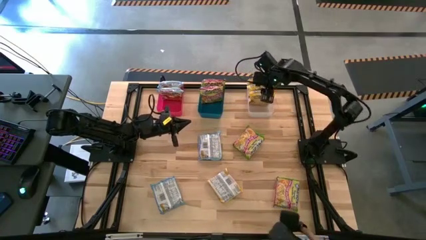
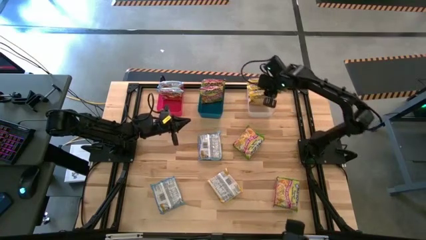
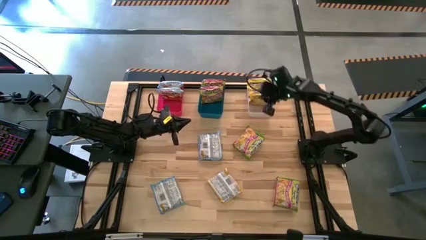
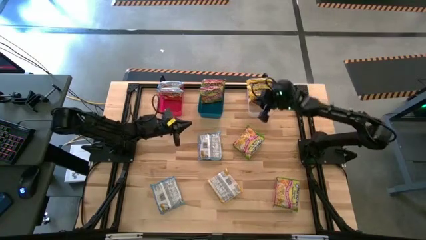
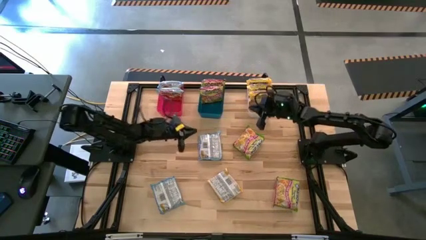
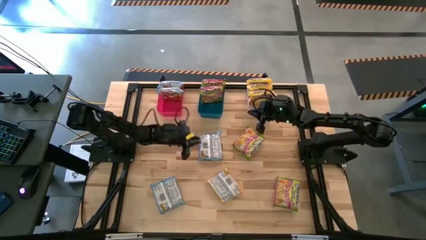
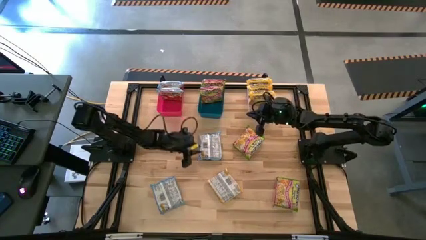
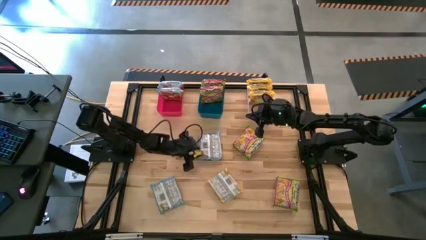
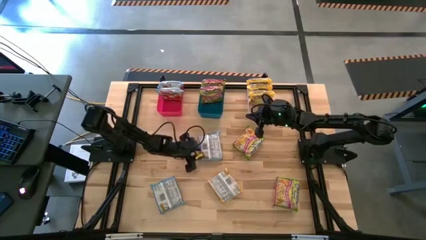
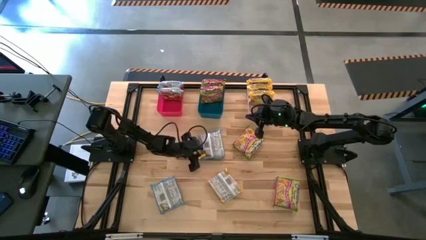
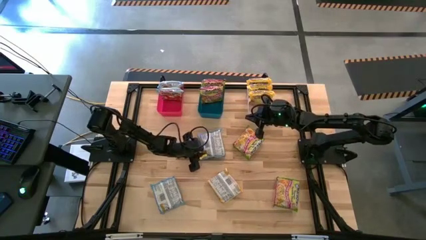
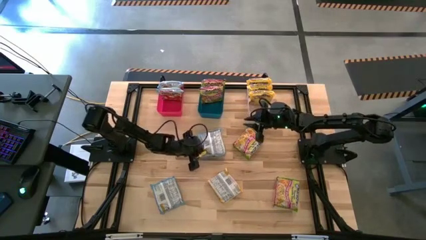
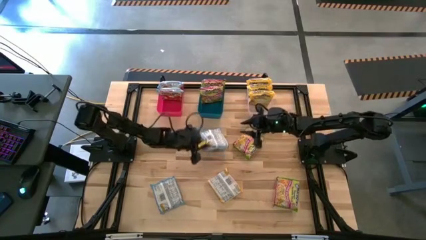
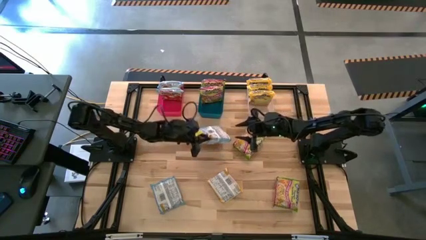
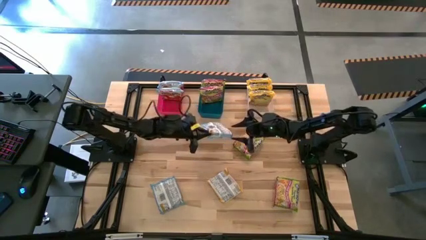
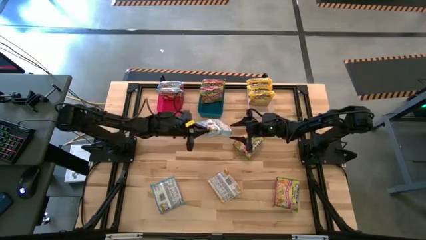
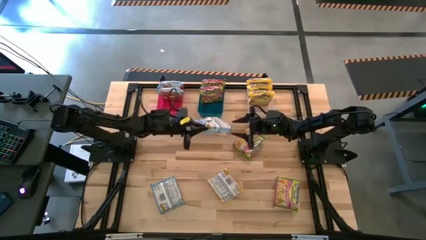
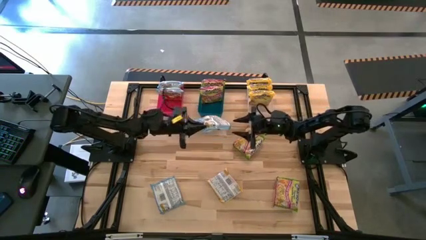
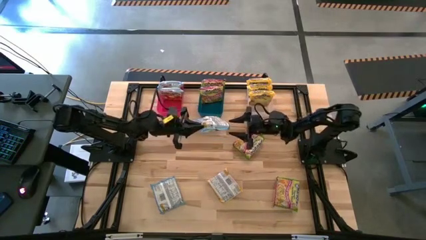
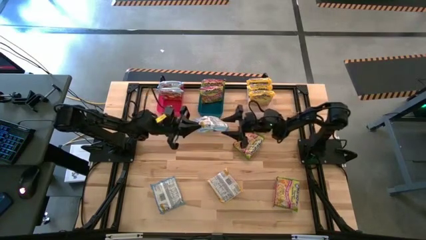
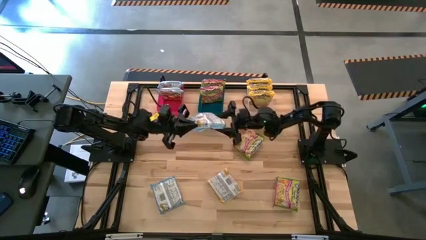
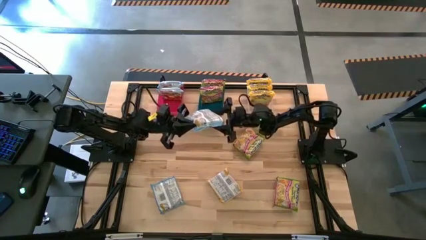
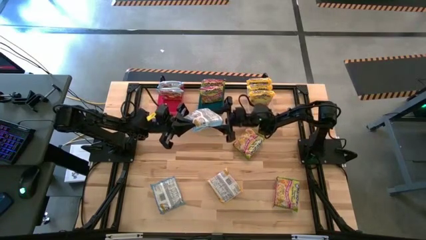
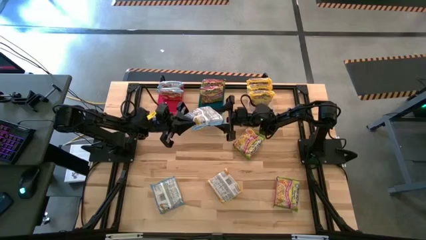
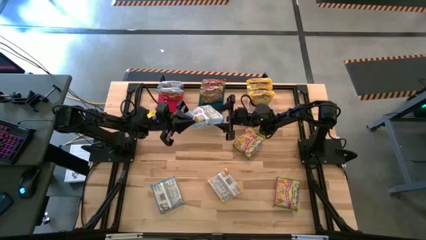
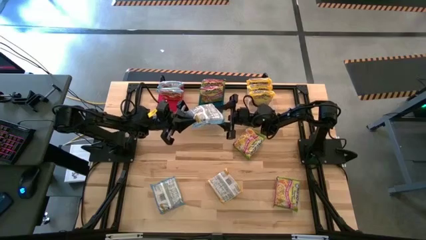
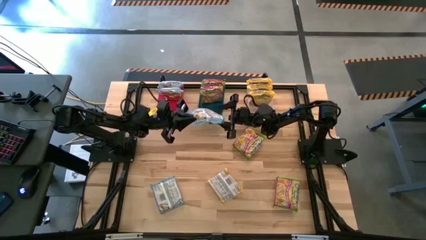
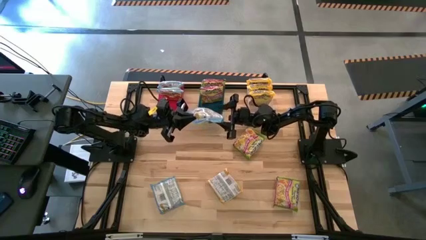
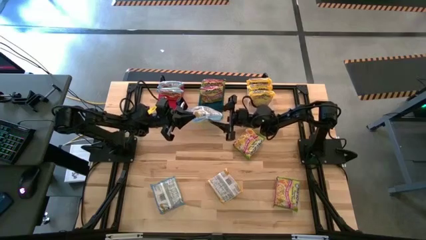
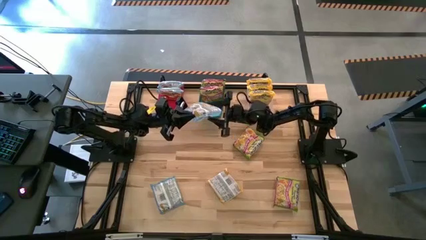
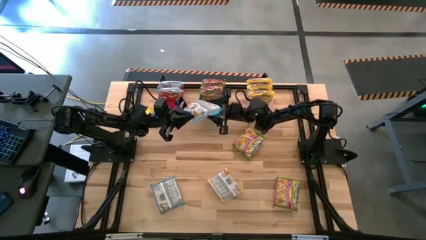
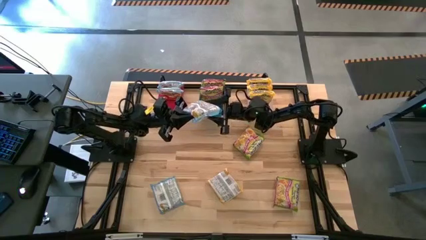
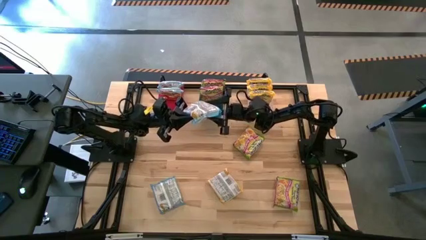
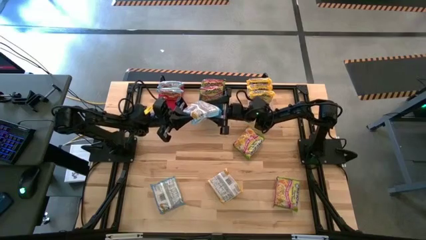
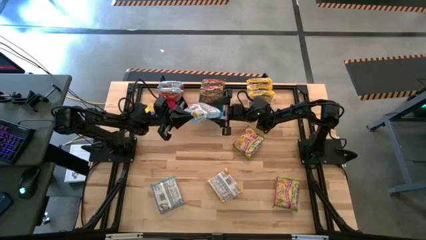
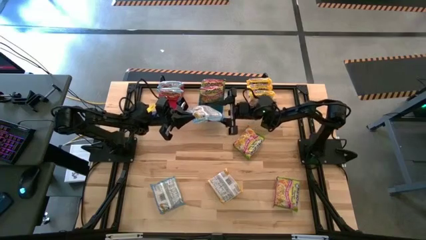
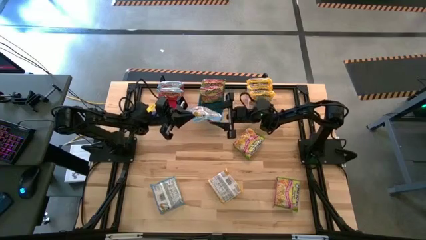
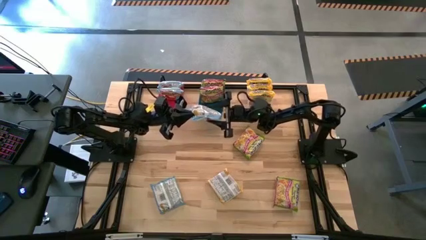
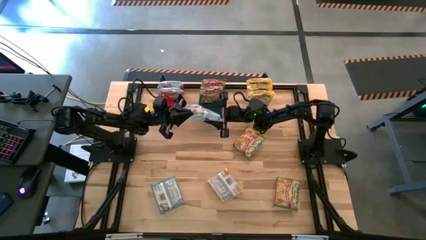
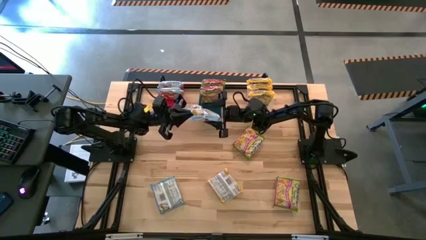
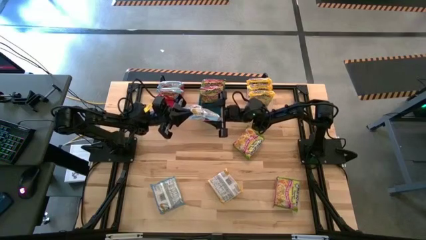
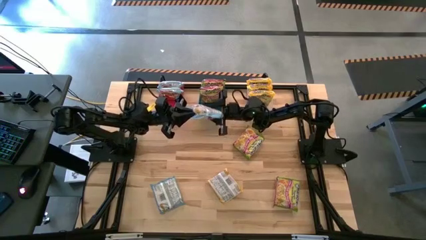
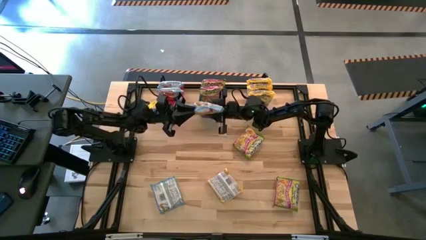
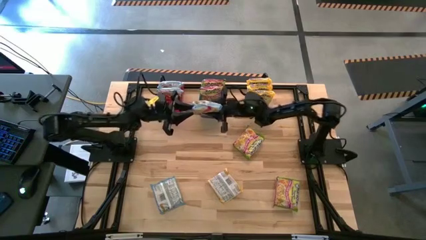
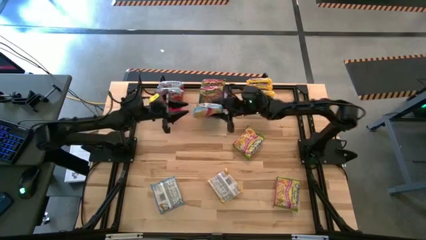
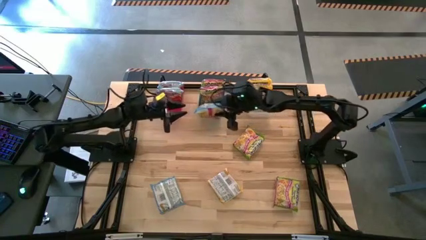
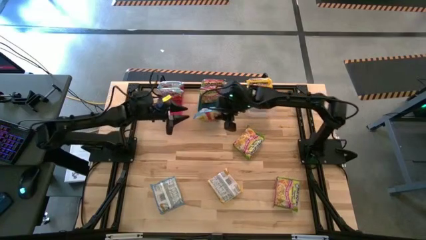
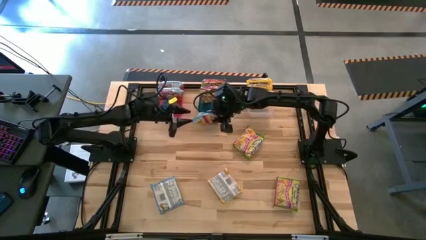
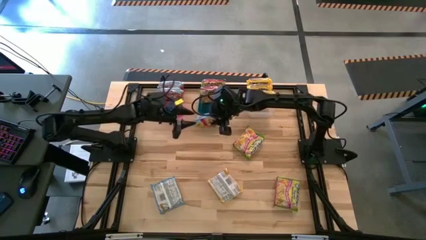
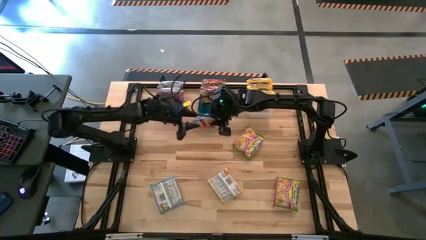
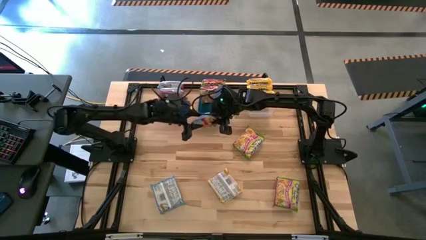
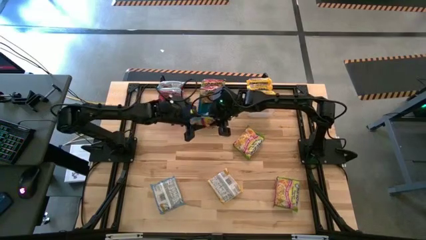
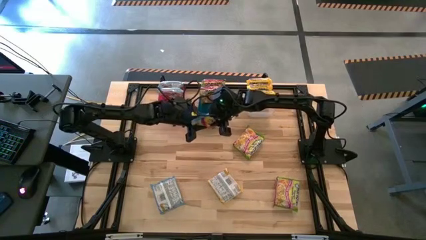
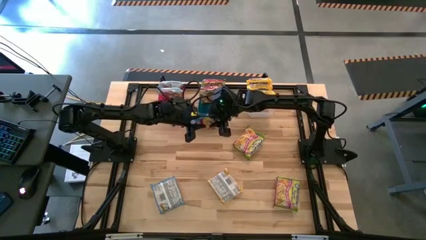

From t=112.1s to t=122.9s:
Task: Sort Maruchan noodles
Put the top blue noodle pack into the red bin
